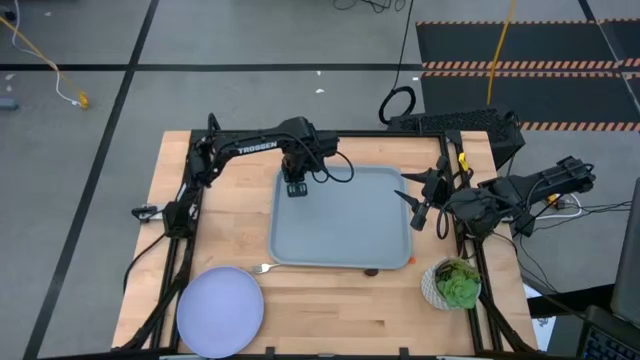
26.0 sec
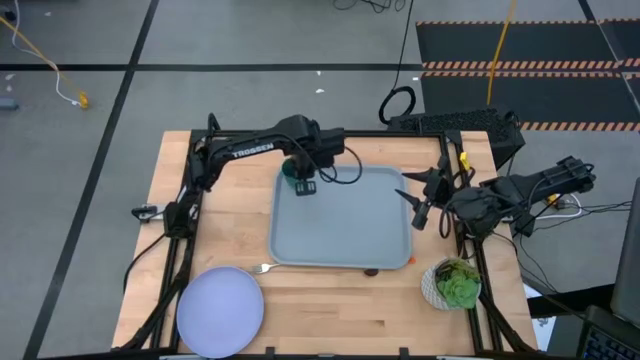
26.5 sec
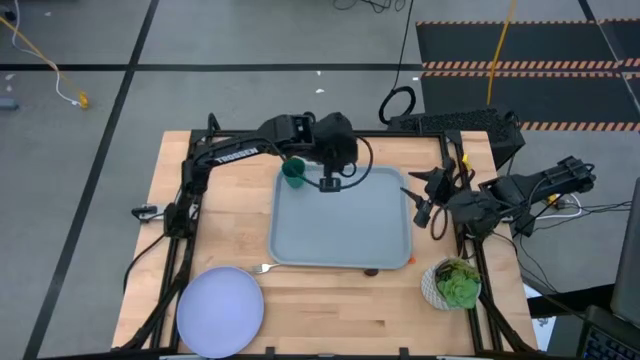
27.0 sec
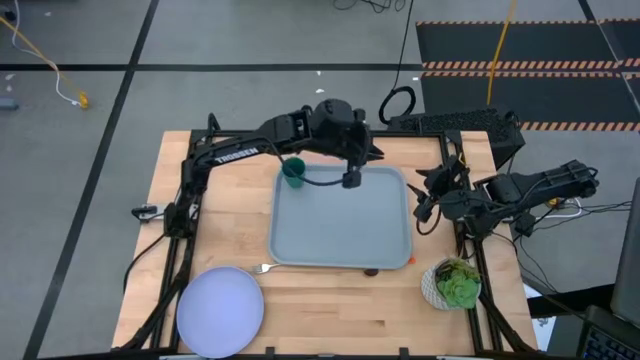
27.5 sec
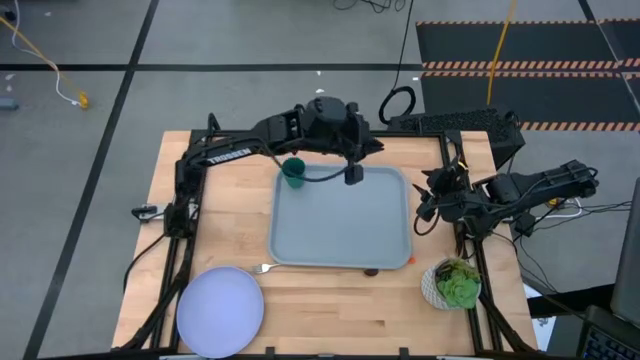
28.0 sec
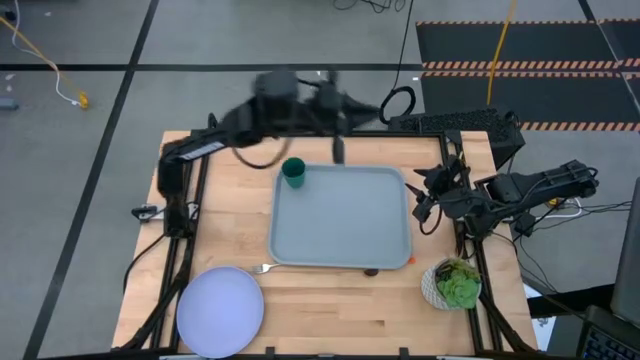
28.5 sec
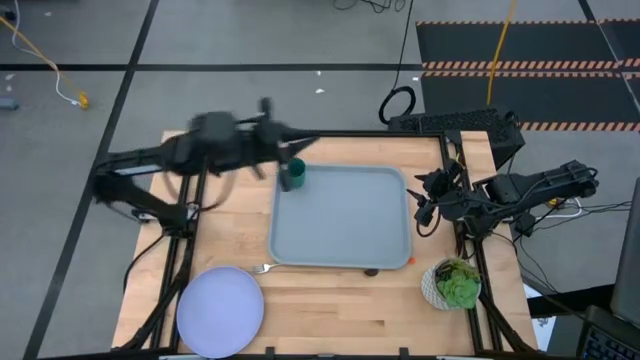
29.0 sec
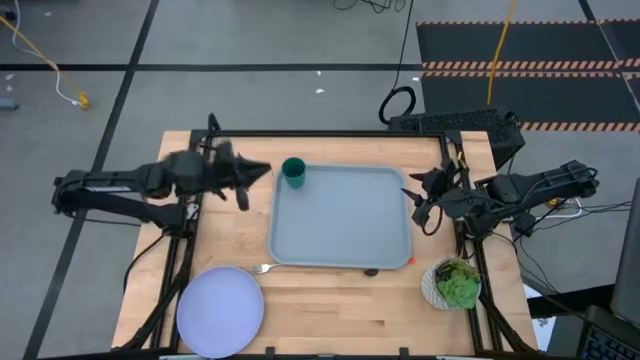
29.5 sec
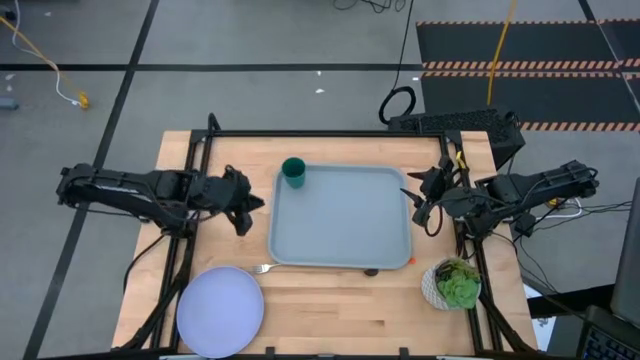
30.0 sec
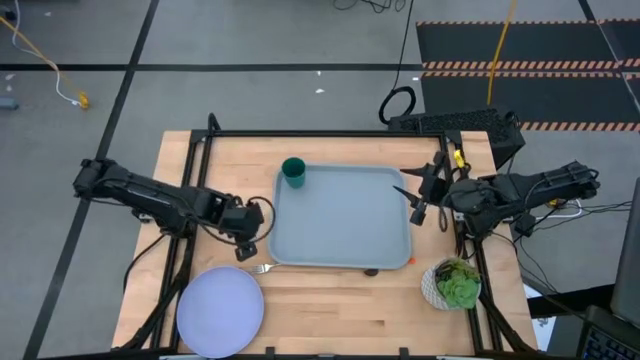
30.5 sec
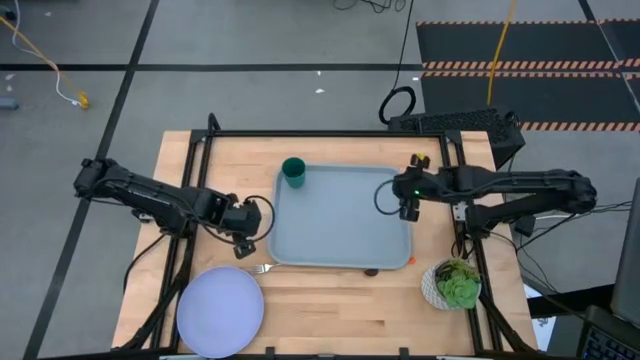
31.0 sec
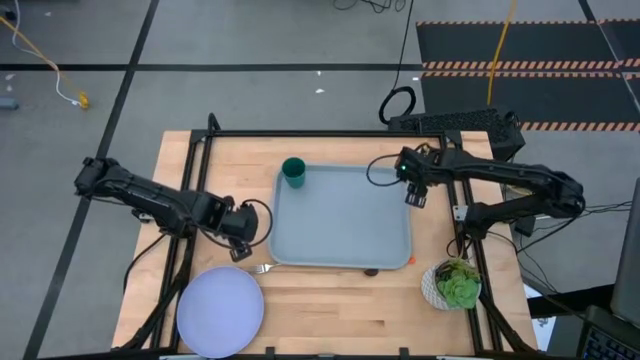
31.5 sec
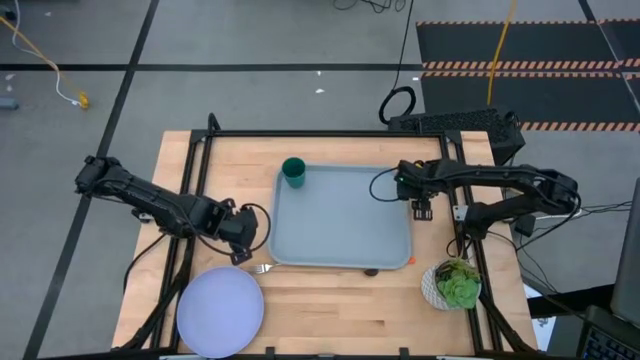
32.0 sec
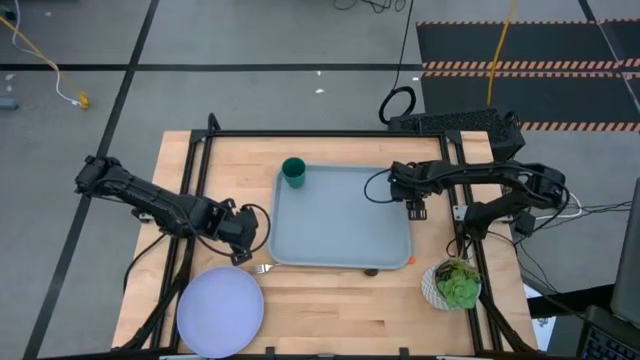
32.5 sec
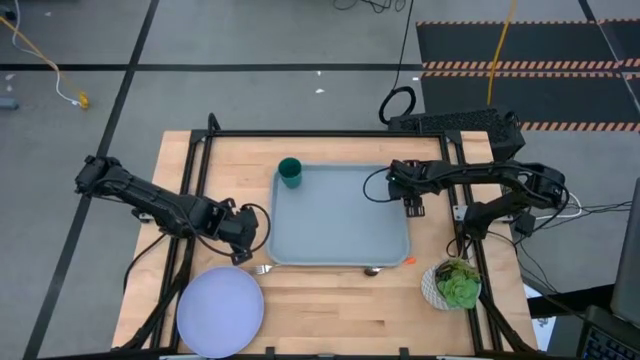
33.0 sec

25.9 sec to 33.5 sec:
Task: Pick and place plate/cup/fork/spoon on tray
Adjust the gray serving tray

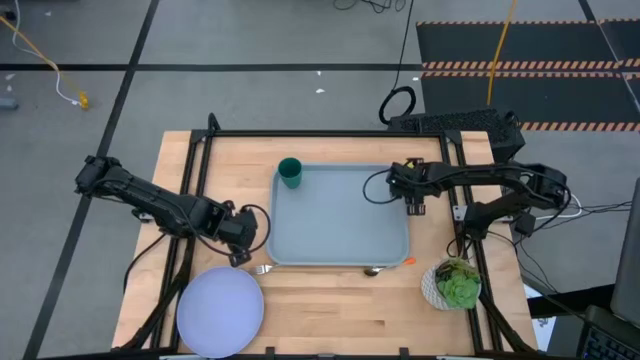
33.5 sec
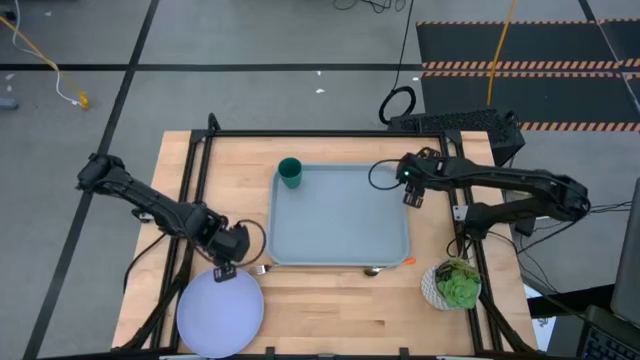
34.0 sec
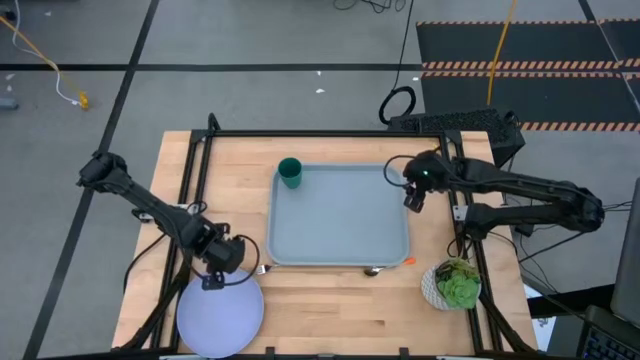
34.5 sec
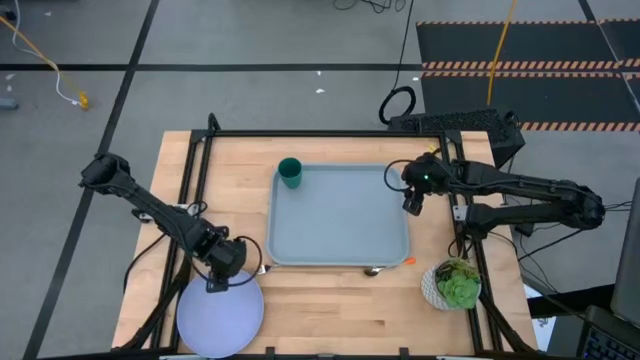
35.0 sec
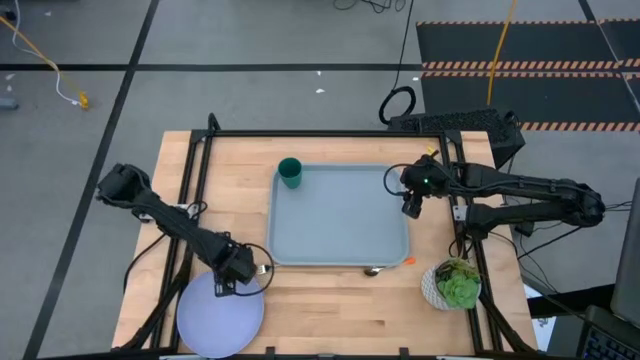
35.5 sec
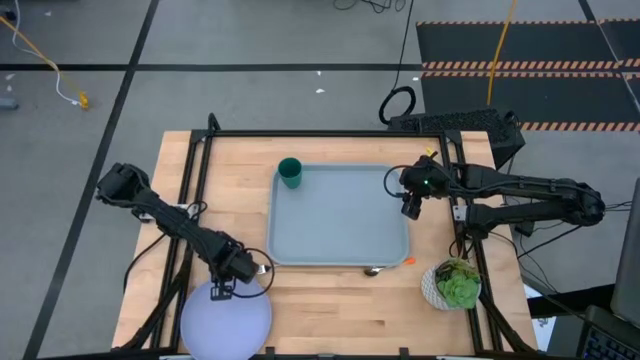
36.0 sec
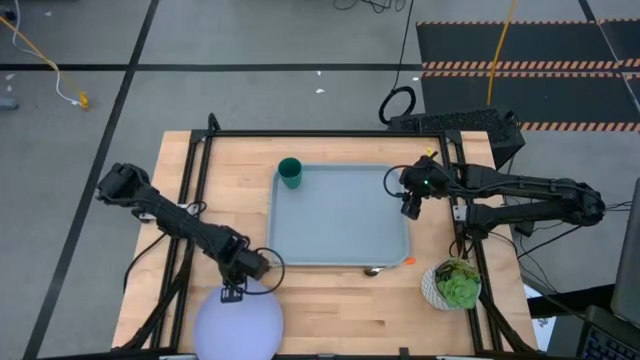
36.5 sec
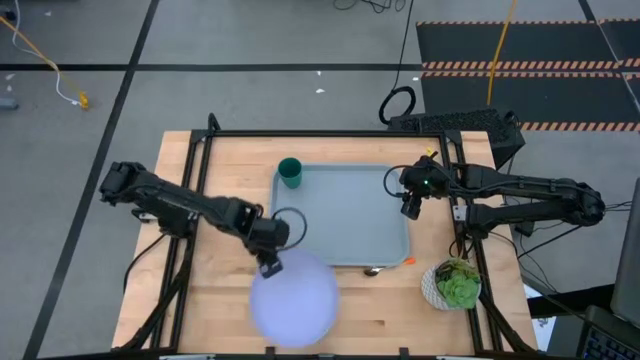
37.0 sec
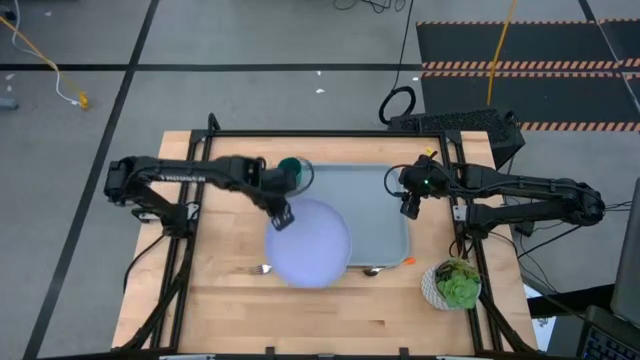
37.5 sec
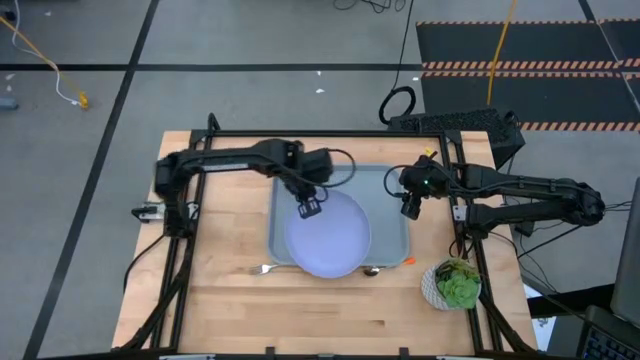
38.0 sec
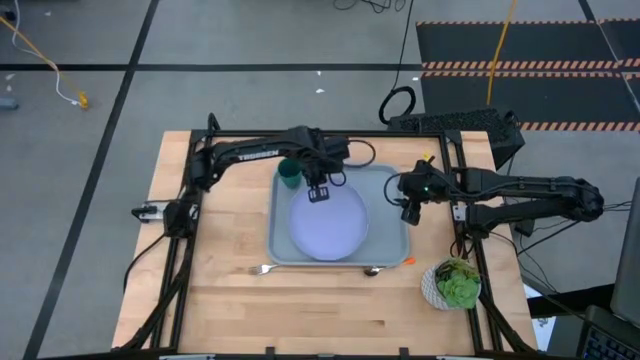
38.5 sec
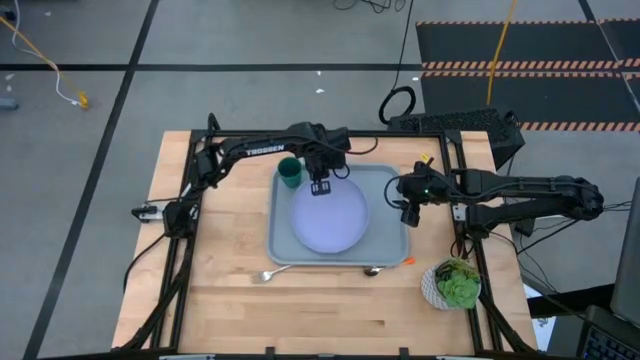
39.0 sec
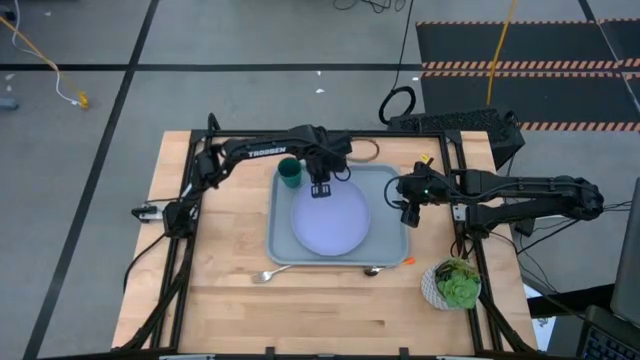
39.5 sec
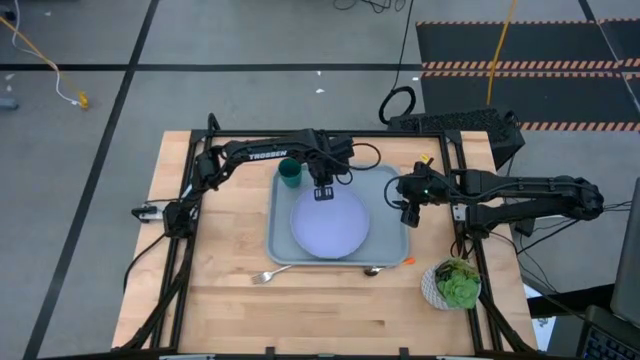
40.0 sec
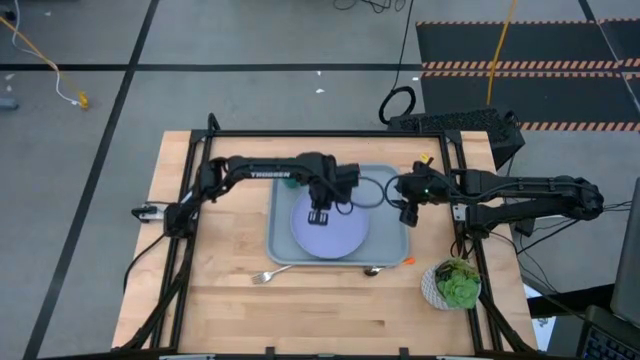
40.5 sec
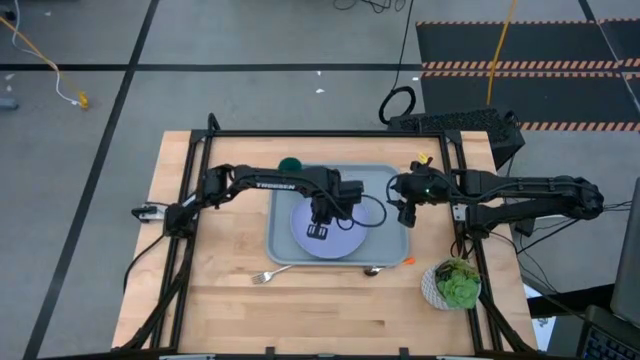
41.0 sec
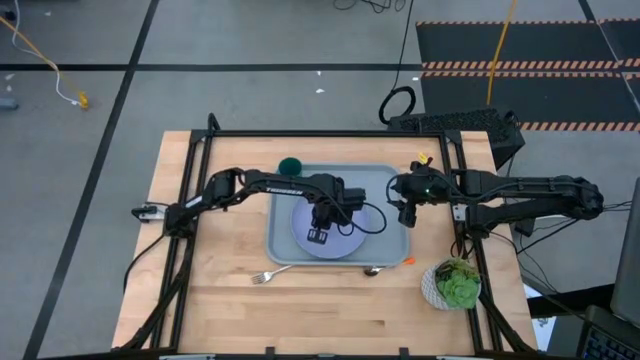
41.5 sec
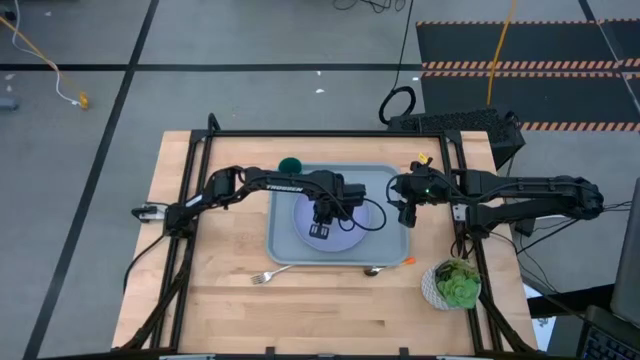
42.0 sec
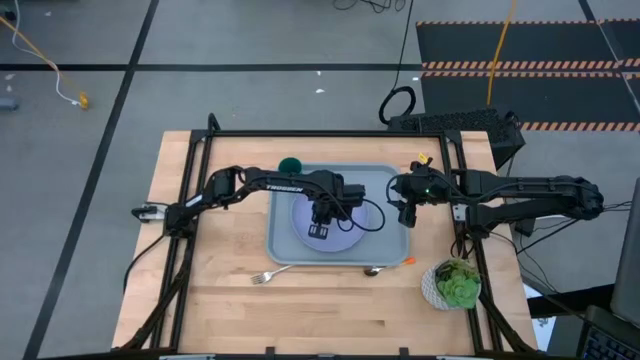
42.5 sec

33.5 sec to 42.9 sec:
Put the violet plate on the gray serving tray to the bottom right of the green cup

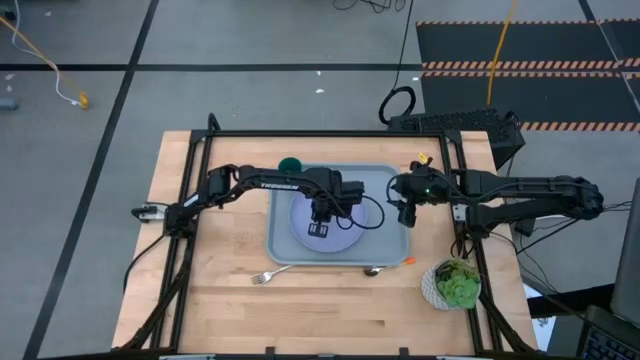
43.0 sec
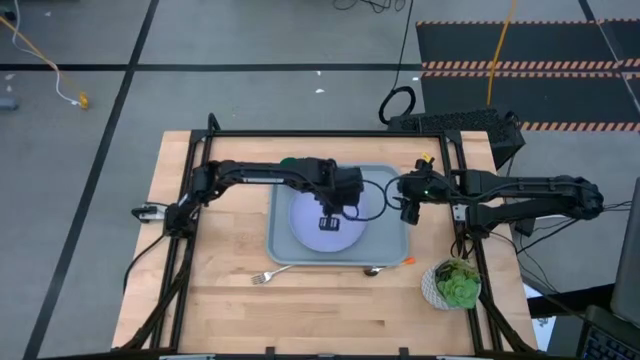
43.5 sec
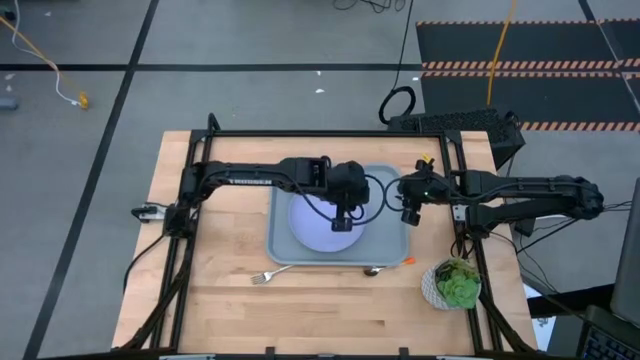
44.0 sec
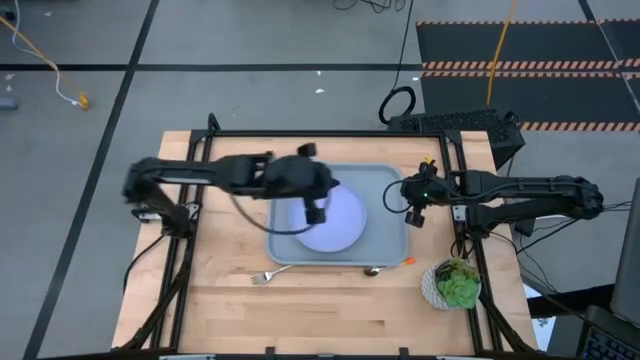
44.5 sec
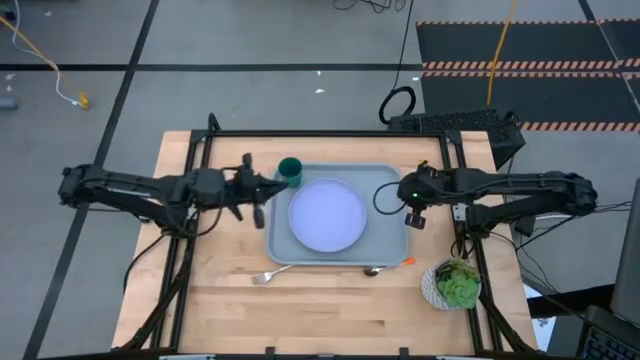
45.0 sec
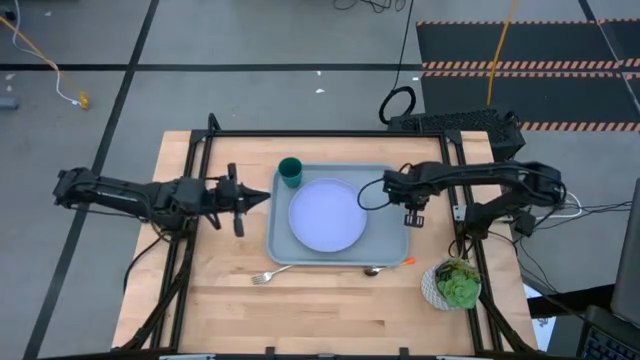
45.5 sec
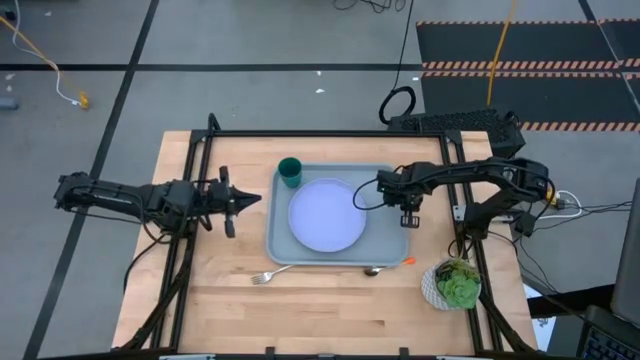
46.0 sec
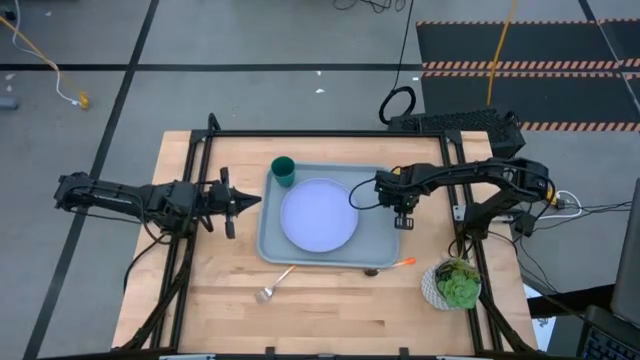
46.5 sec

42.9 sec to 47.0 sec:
Adjust the gray serving tray

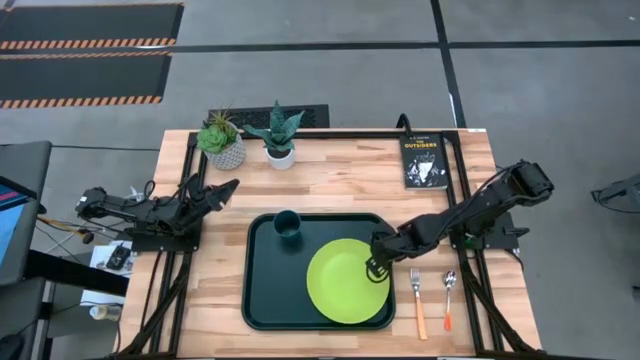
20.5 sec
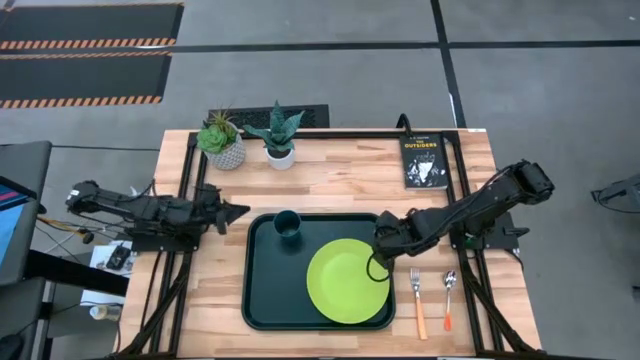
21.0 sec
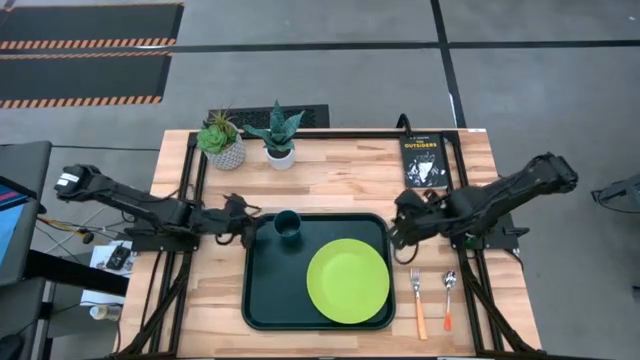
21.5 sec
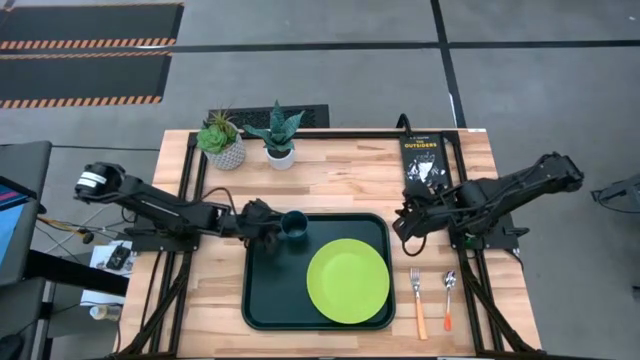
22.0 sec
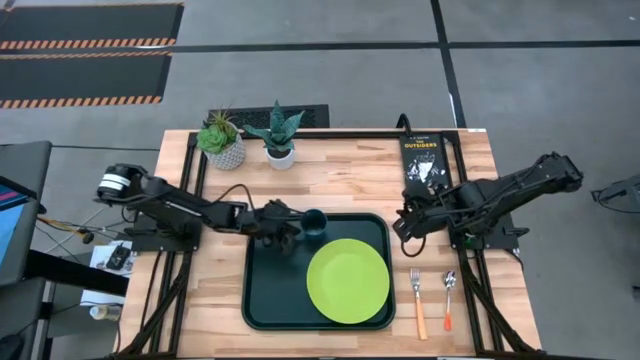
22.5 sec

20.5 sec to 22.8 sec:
Task: Pick and place plate/cup/fork/spoon on tray
Move the dark green cup on the top of the light green plate
